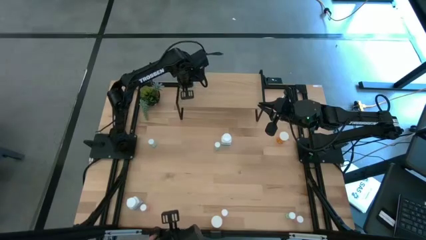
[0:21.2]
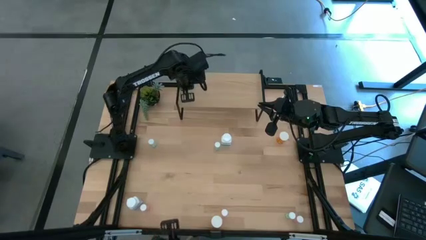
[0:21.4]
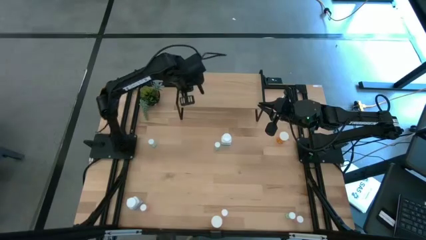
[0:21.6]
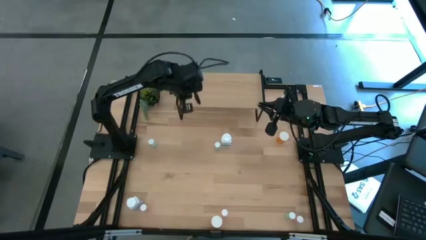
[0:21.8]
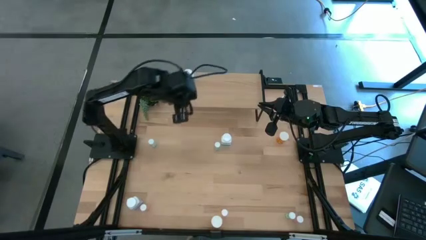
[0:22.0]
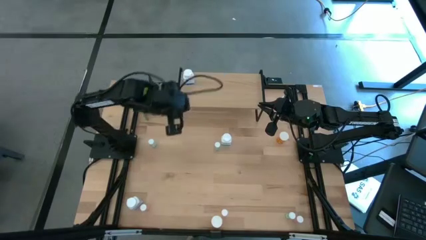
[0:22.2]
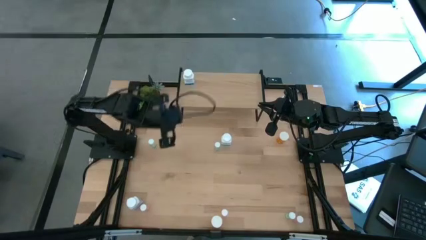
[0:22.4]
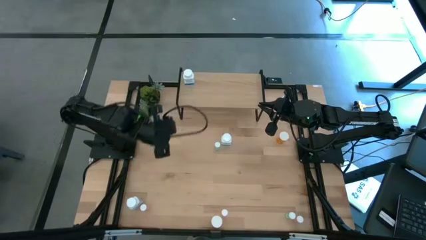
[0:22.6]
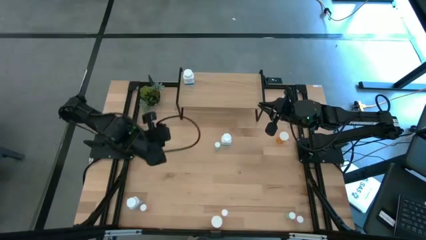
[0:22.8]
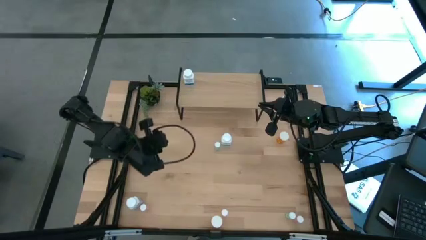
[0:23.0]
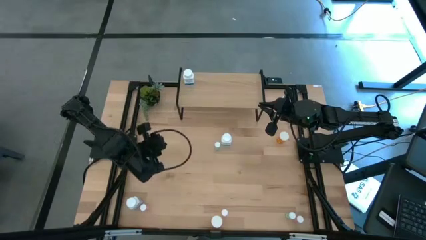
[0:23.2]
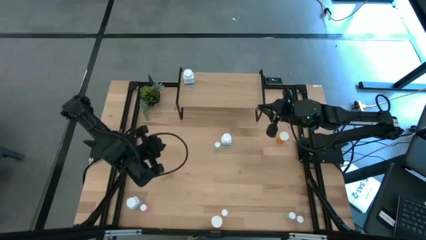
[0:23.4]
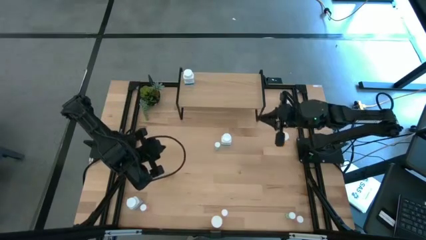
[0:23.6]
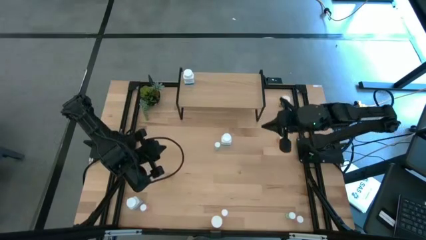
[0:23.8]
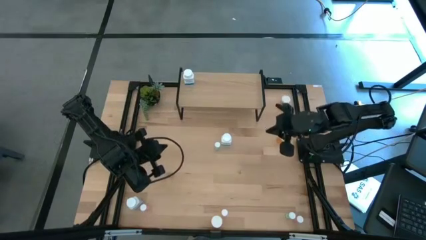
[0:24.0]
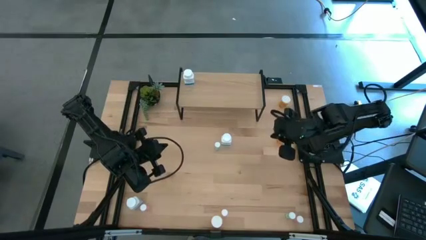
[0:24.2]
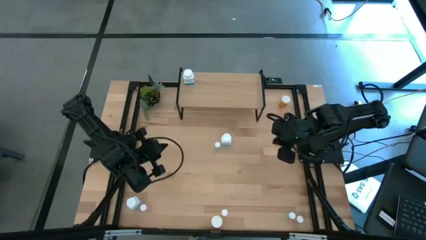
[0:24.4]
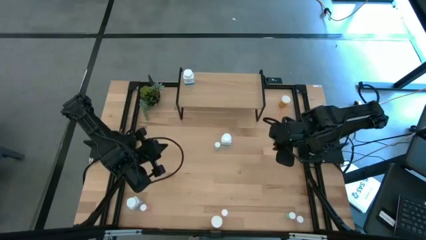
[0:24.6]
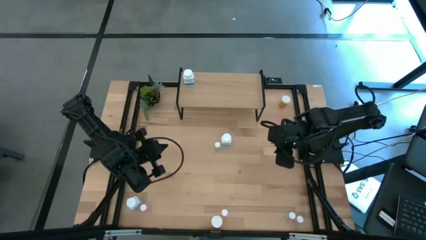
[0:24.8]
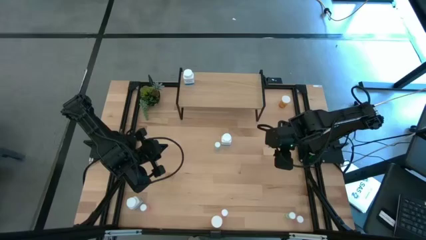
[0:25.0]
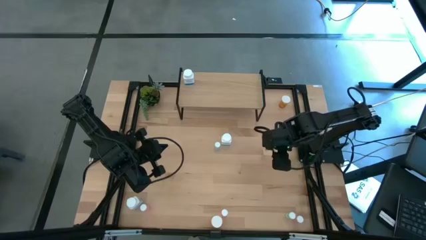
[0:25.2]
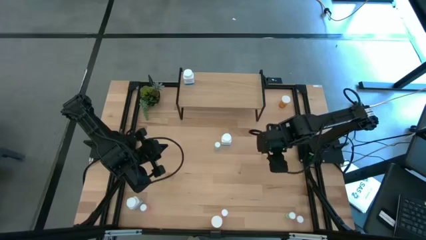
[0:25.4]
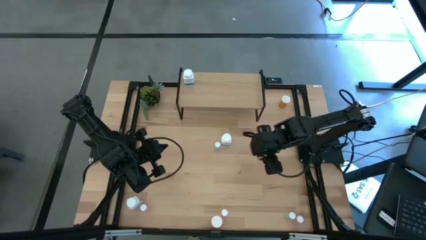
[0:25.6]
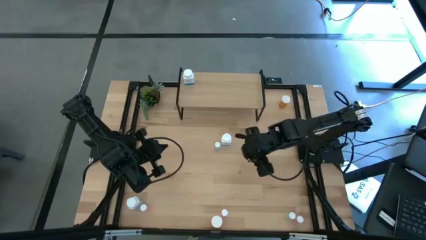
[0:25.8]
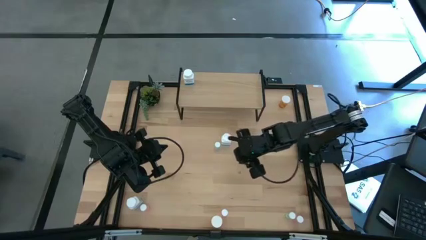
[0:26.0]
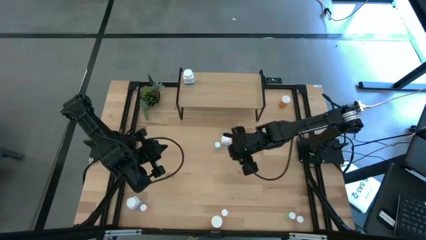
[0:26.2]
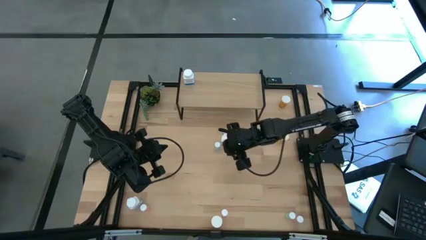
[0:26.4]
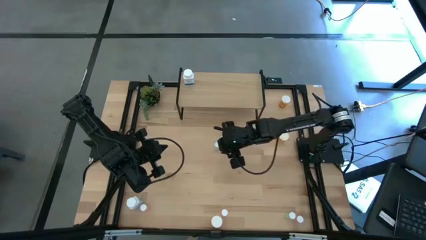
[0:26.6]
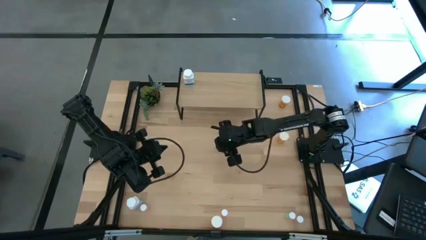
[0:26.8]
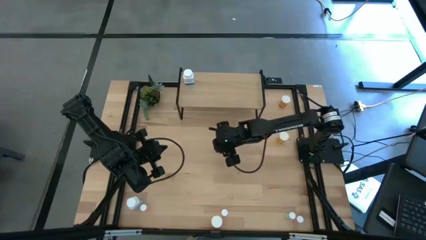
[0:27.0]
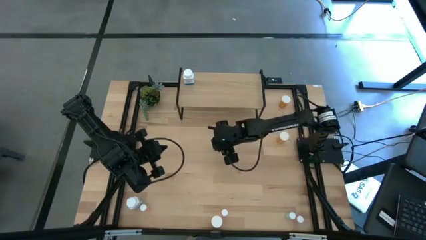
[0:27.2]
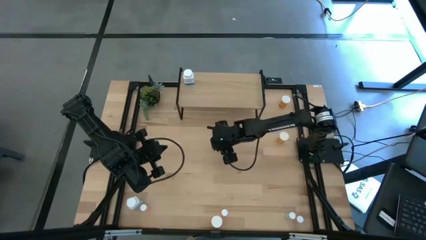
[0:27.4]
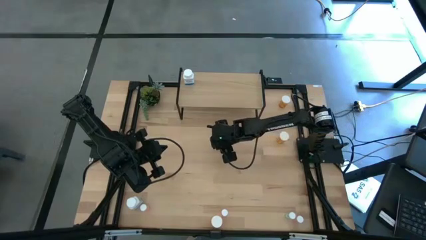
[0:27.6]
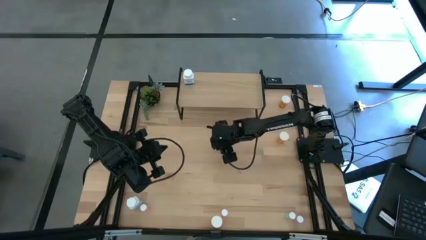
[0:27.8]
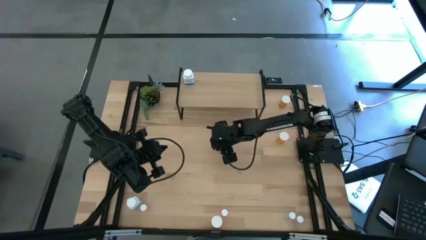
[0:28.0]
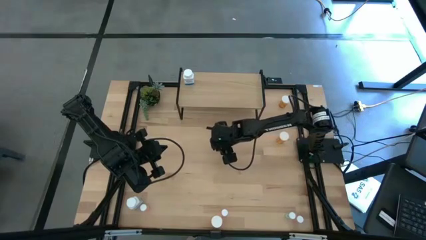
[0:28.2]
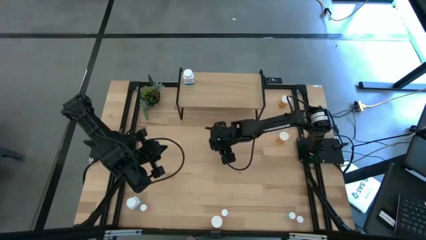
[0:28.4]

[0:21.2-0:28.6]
Task: Pick and place medicine bottles onto shelf by color
Put the top right blue pill bottle on the shelf

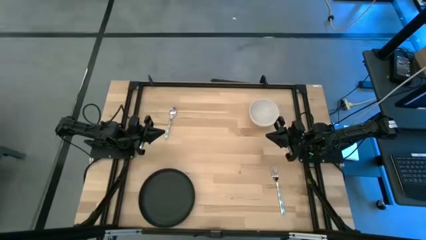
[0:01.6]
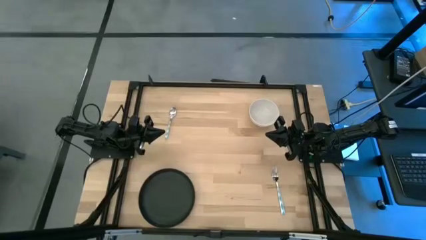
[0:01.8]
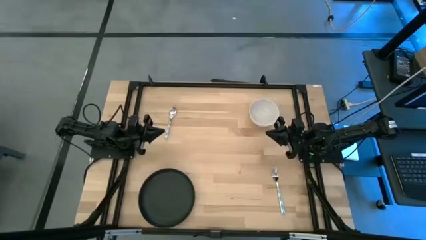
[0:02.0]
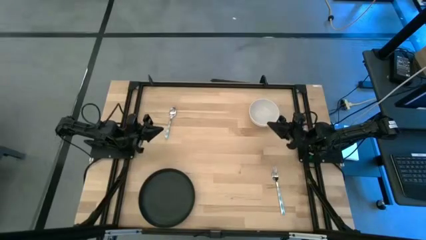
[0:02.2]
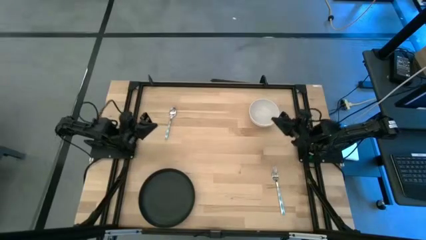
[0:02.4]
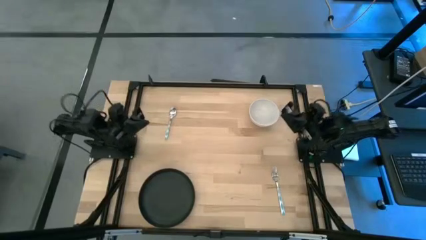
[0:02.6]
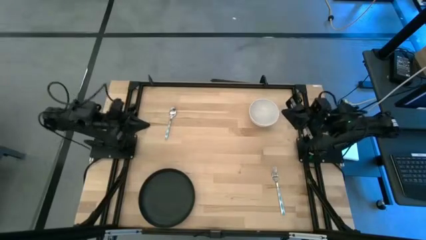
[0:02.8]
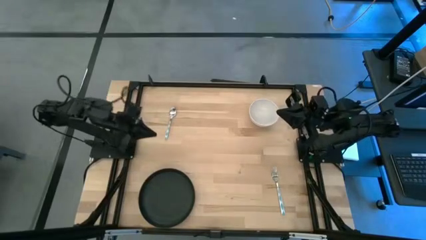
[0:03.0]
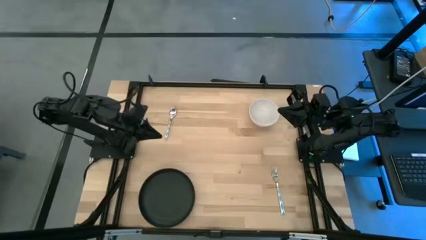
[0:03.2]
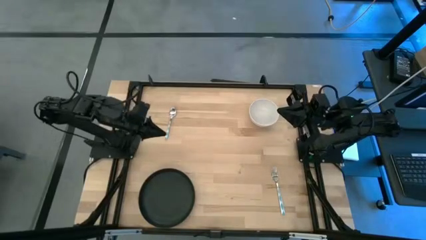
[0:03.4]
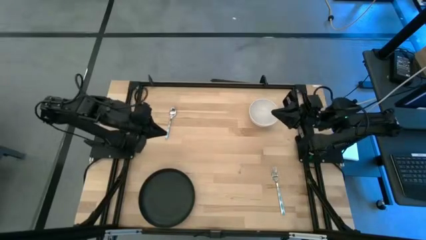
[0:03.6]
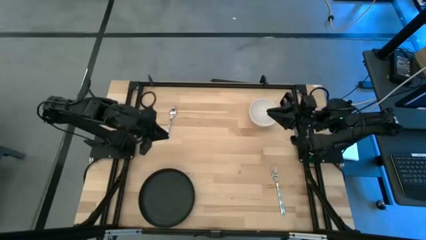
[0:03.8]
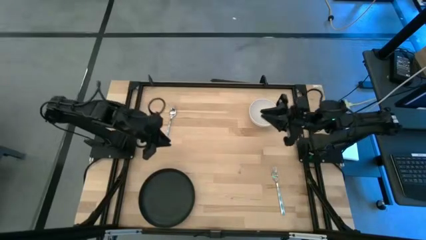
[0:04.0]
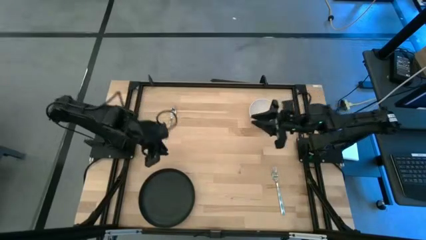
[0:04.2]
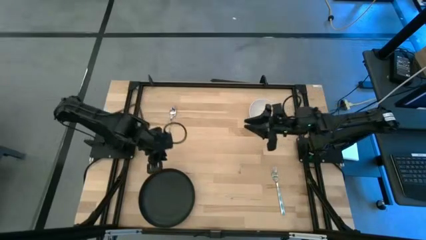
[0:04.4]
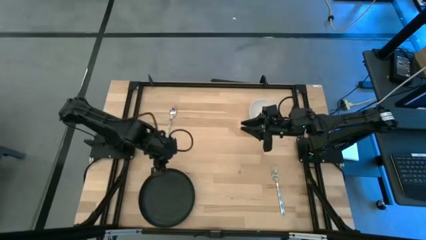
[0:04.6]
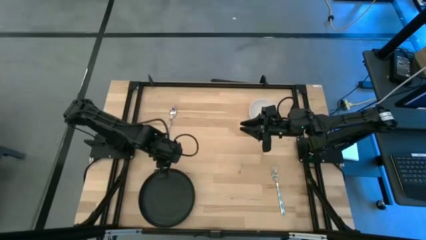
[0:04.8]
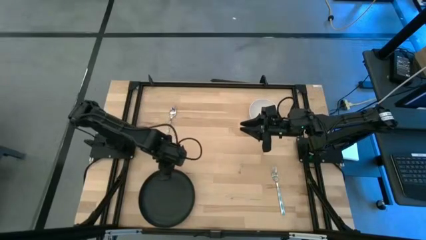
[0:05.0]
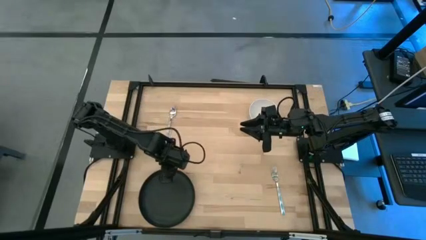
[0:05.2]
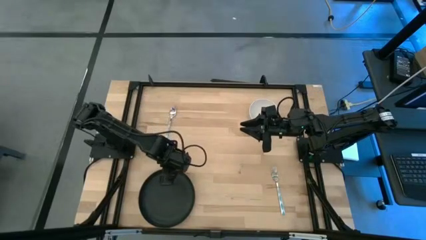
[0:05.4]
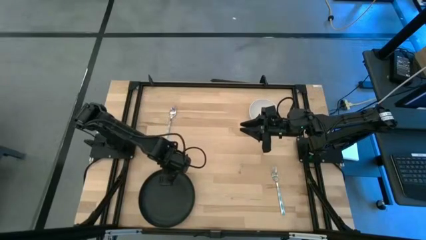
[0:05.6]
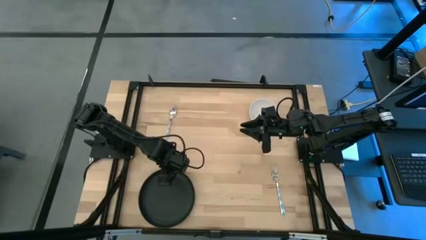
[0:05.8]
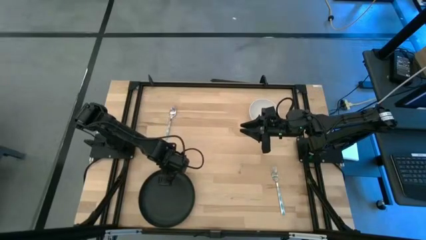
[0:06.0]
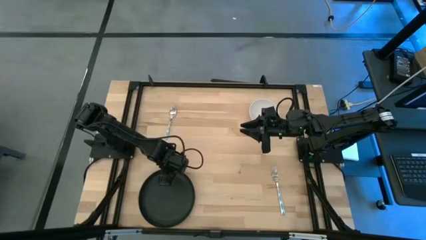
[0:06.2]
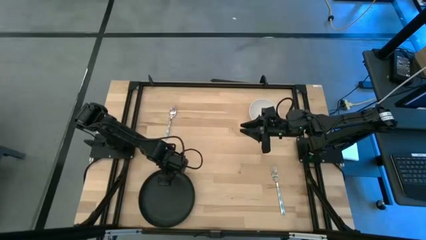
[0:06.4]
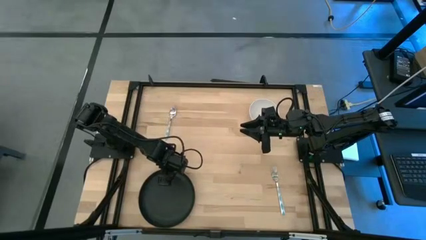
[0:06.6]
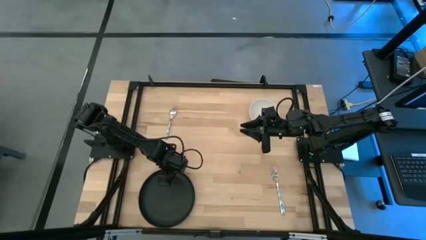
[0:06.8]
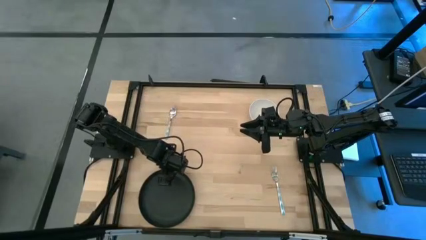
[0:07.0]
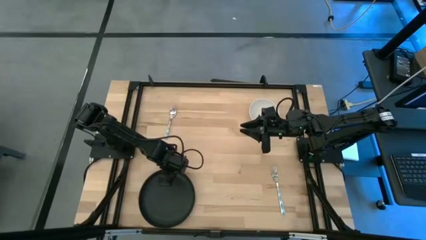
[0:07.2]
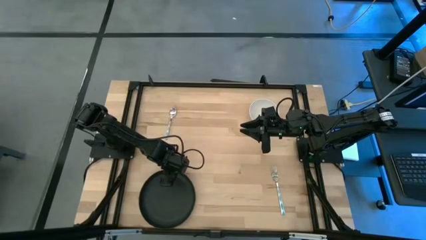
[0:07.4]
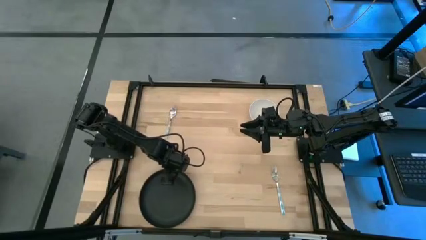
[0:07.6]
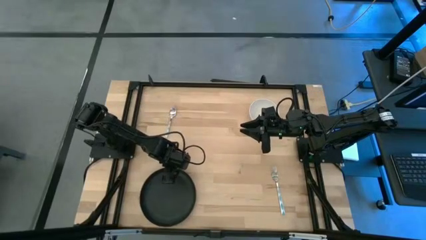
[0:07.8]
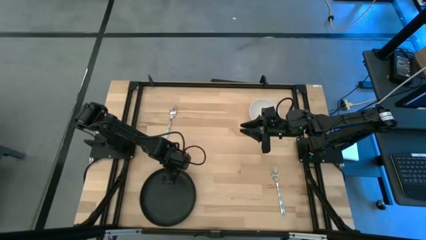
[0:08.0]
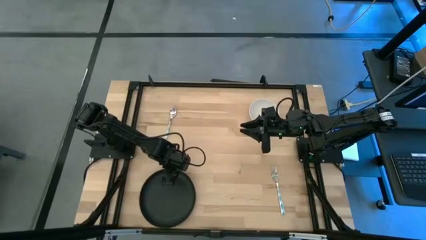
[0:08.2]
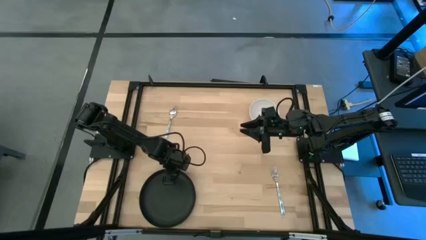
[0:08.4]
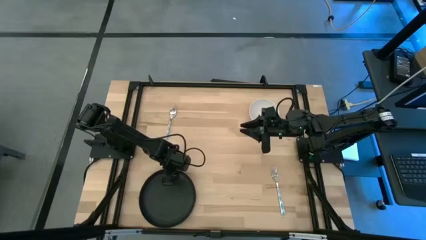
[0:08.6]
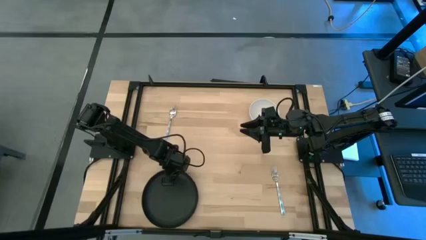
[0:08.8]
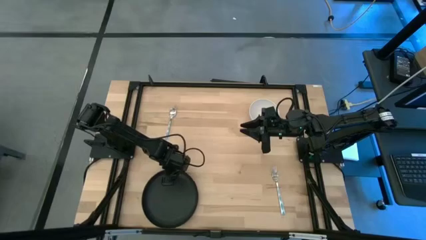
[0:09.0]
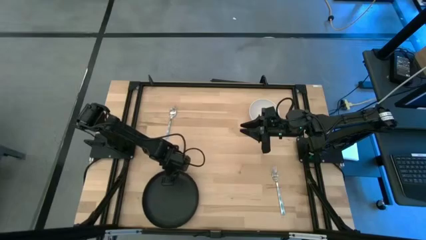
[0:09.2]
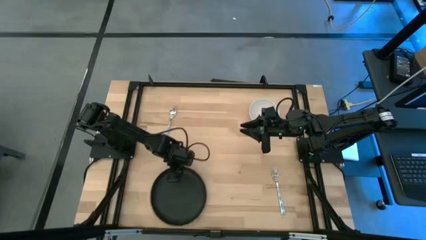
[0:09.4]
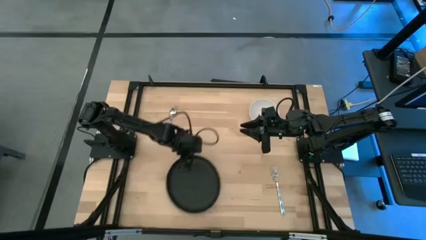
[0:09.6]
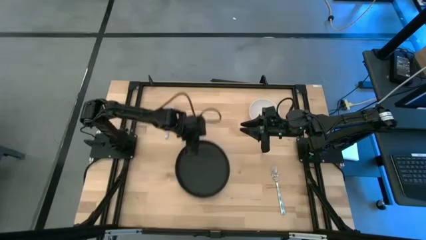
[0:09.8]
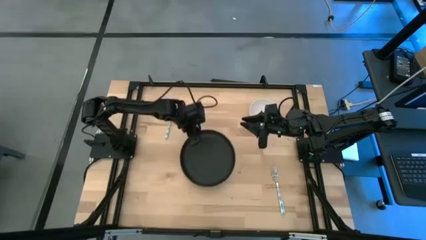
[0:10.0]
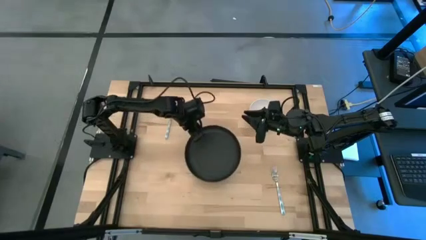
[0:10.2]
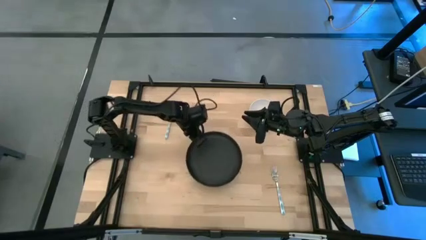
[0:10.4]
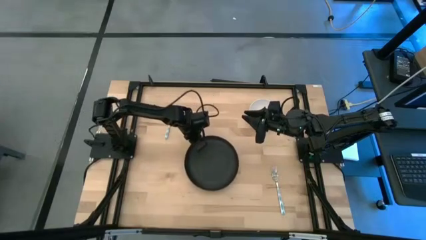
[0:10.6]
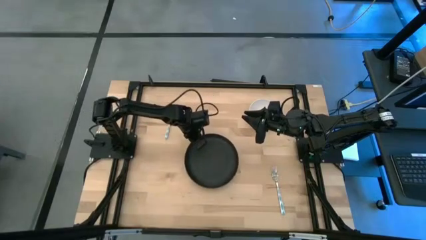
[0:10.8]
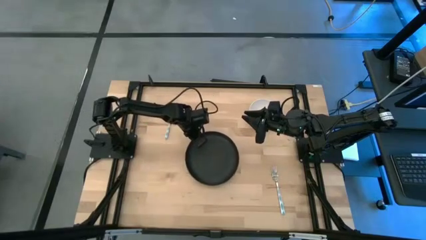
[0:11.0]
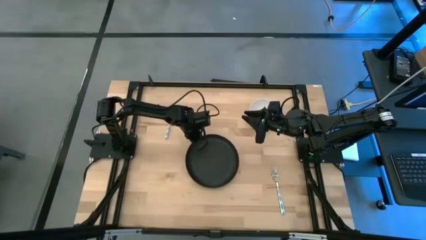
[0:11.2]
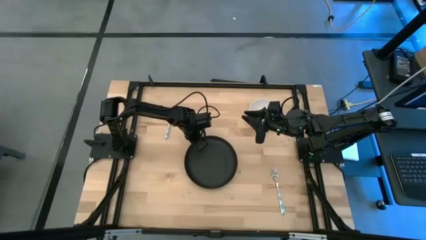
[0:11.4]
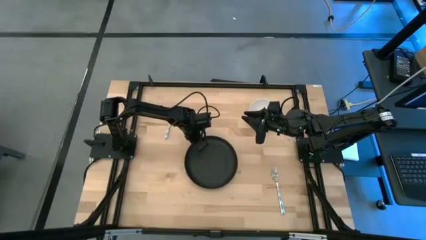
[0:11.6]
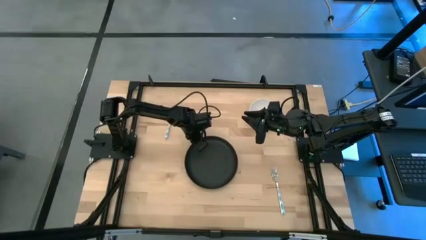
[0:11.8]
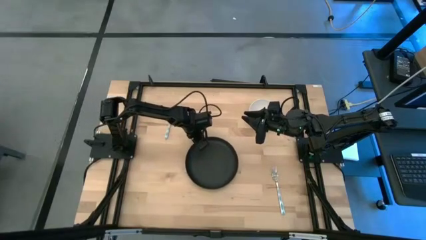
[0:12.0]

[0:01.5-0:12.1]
Task: Set table place
Move the black plate to the center of the table
